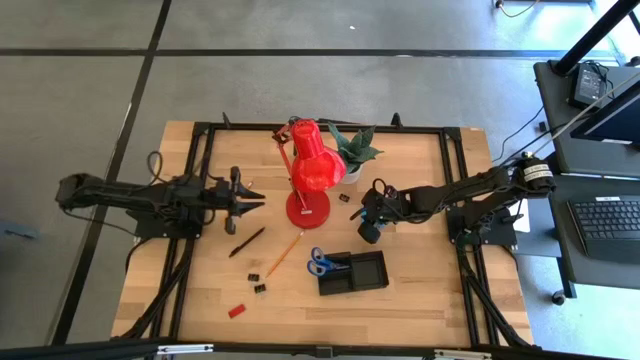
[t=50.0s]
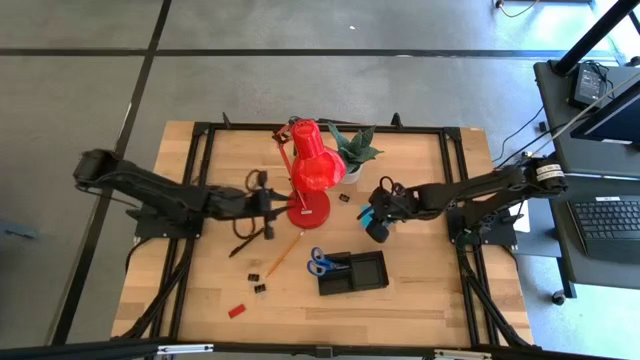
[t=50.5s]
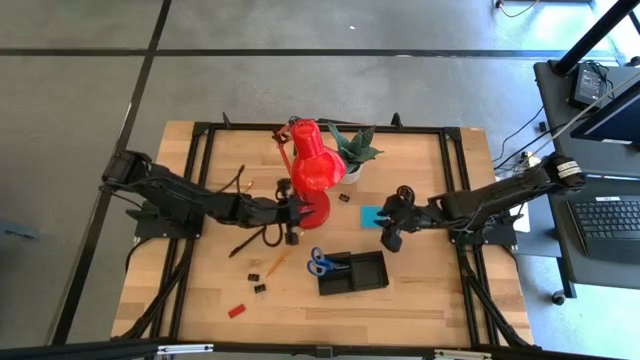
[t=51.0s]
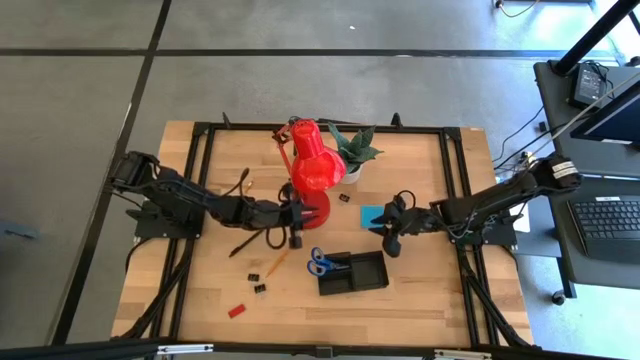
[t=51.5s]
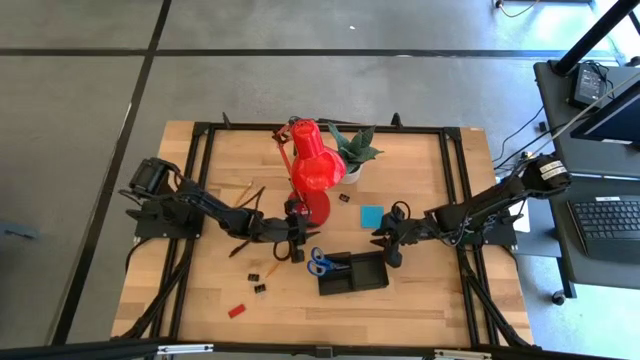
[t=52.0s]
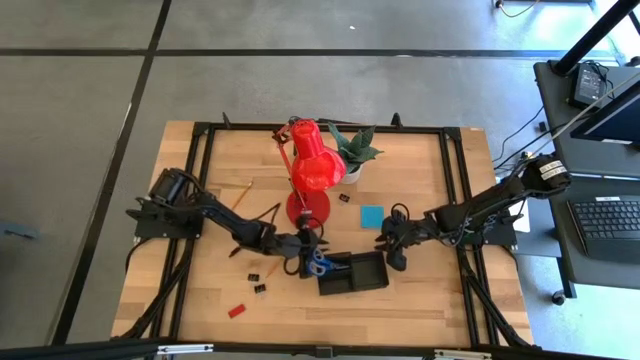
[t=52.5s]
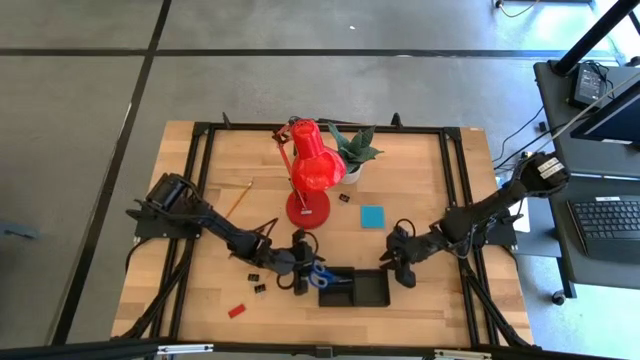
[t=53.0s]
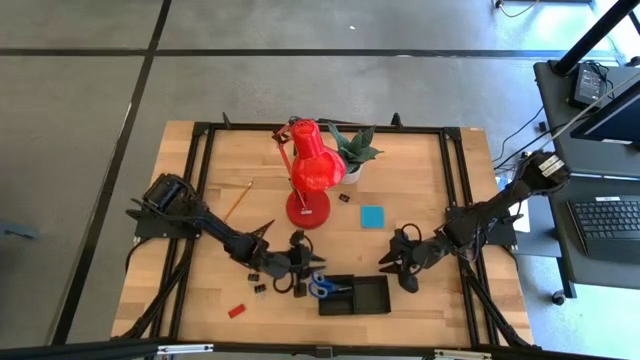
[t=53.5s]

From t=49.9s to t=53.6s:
Task: Pick and place office supplies into organizer
Adjust the black desk organizer

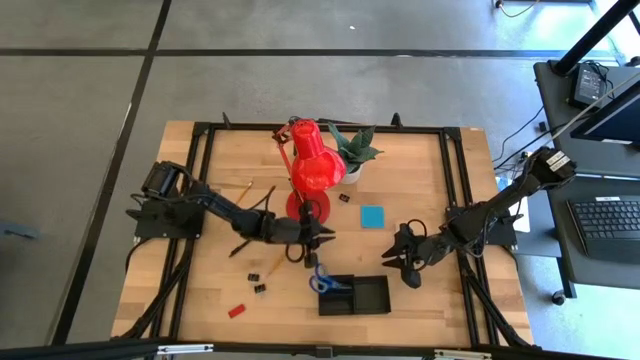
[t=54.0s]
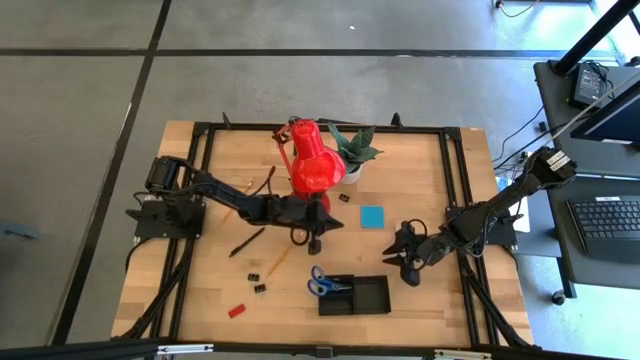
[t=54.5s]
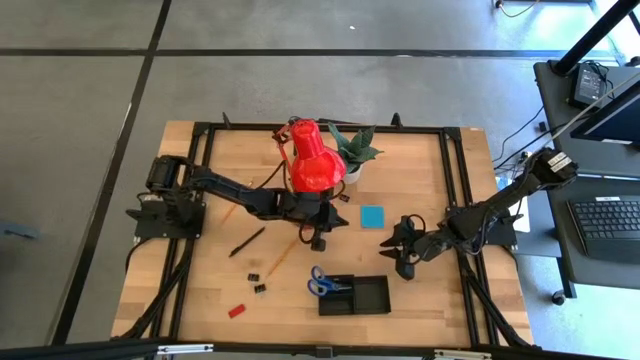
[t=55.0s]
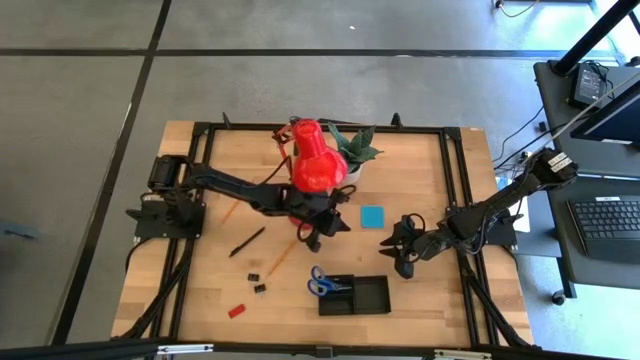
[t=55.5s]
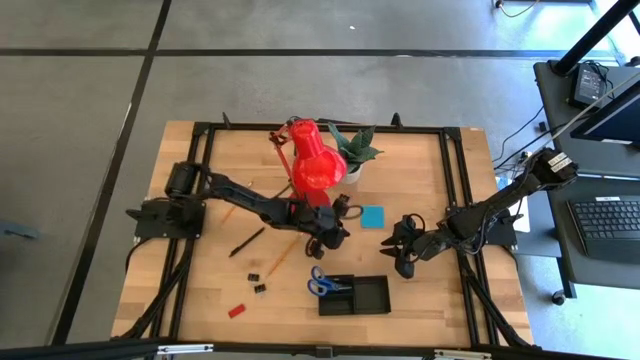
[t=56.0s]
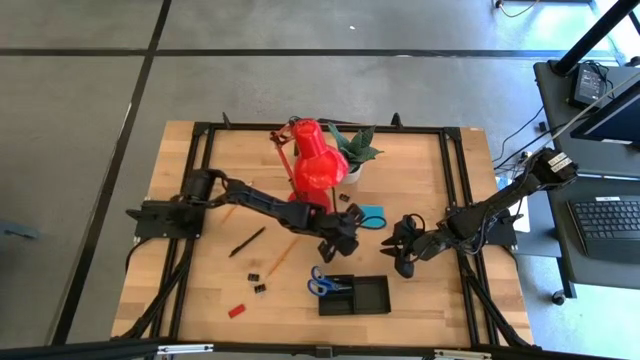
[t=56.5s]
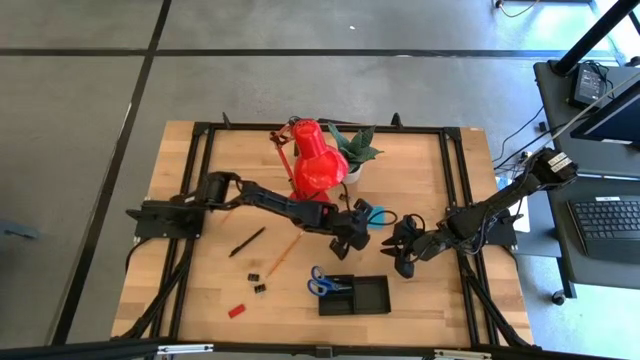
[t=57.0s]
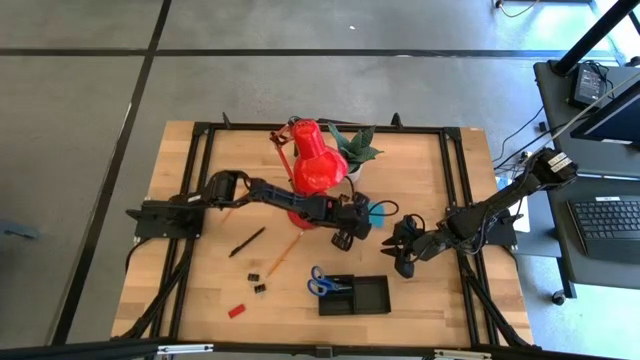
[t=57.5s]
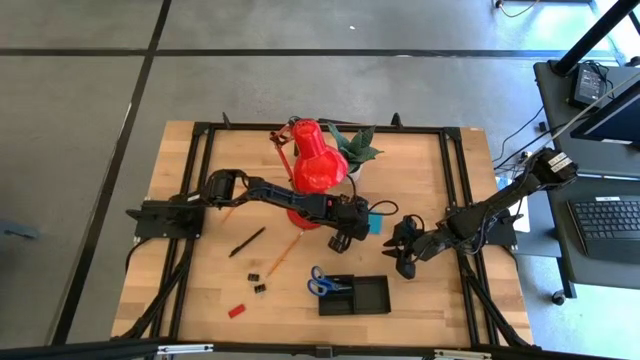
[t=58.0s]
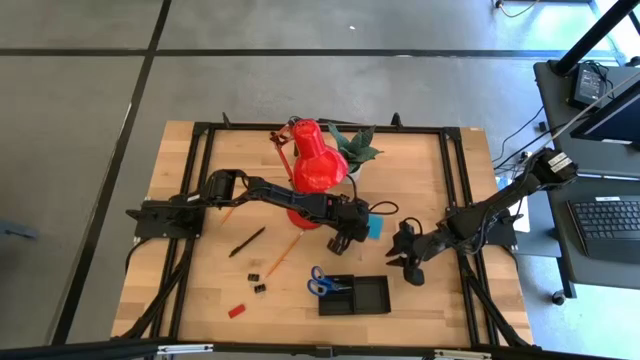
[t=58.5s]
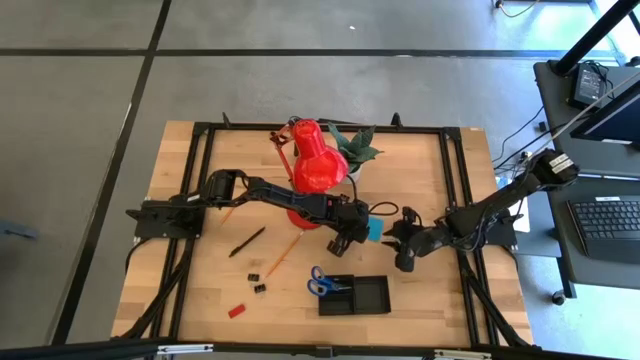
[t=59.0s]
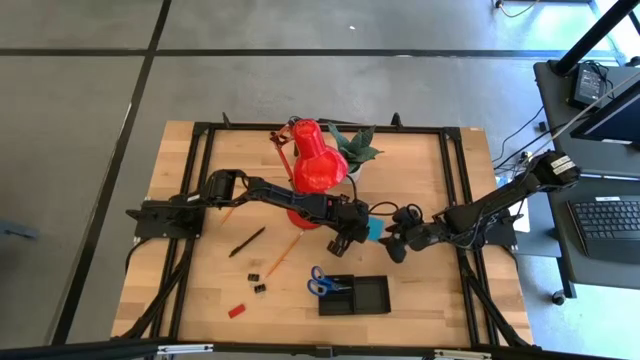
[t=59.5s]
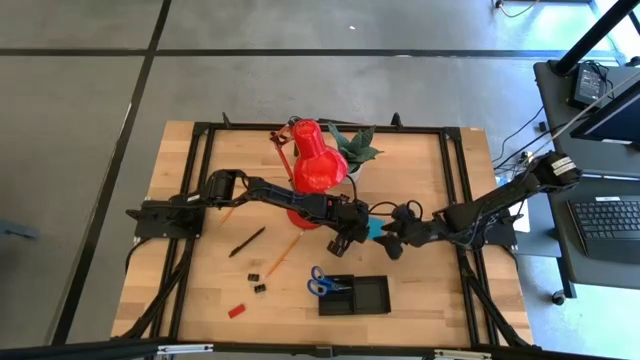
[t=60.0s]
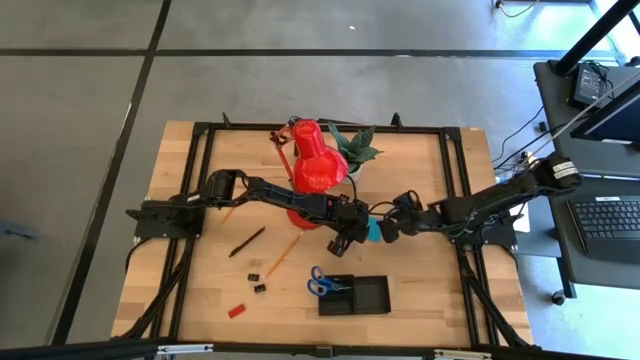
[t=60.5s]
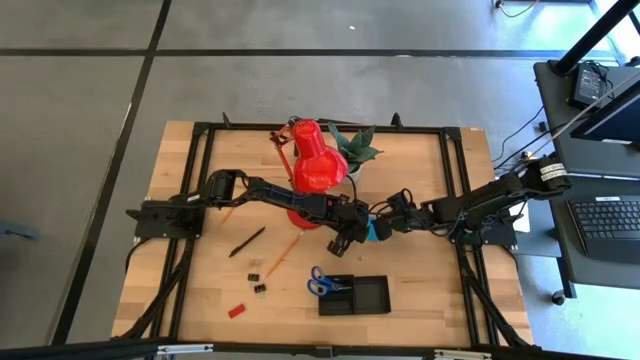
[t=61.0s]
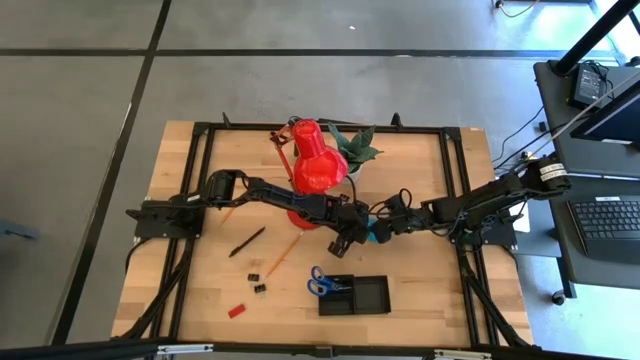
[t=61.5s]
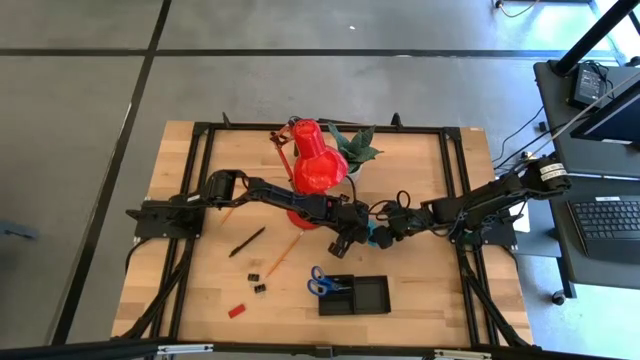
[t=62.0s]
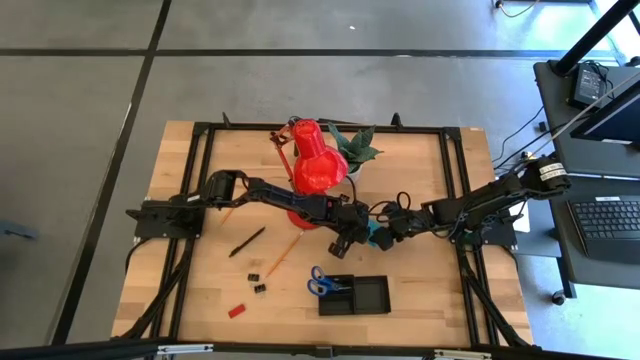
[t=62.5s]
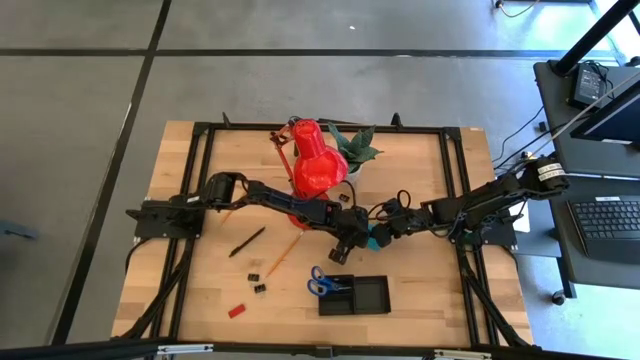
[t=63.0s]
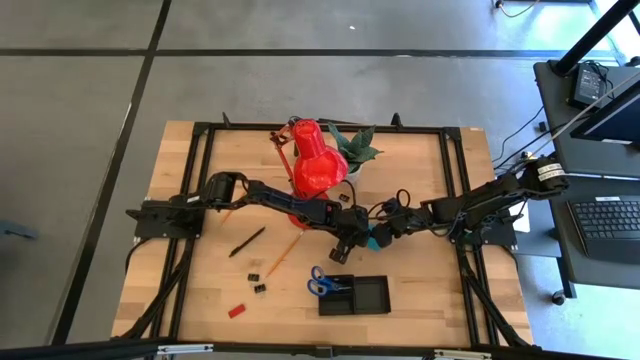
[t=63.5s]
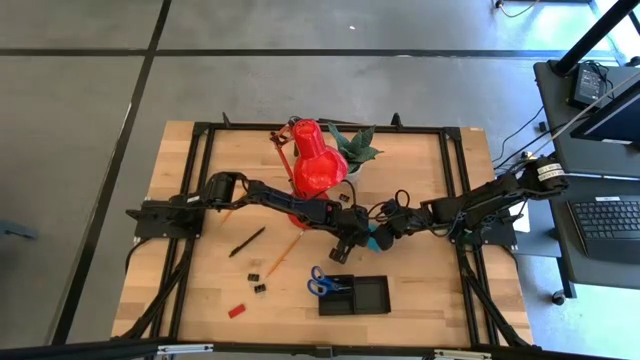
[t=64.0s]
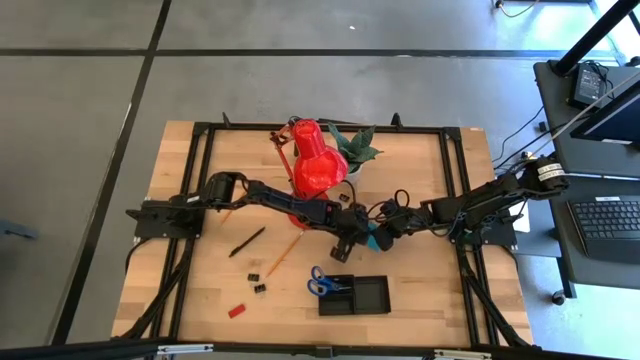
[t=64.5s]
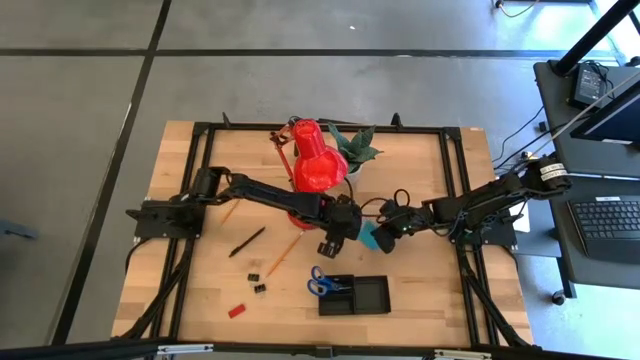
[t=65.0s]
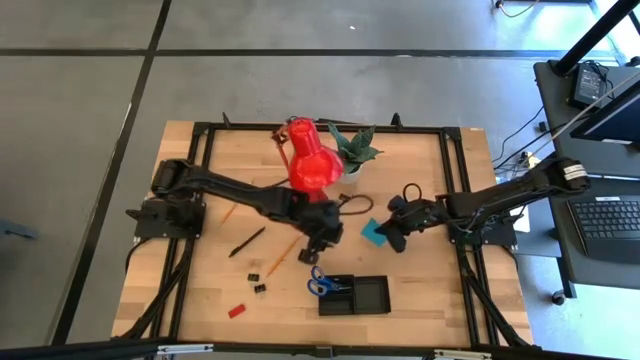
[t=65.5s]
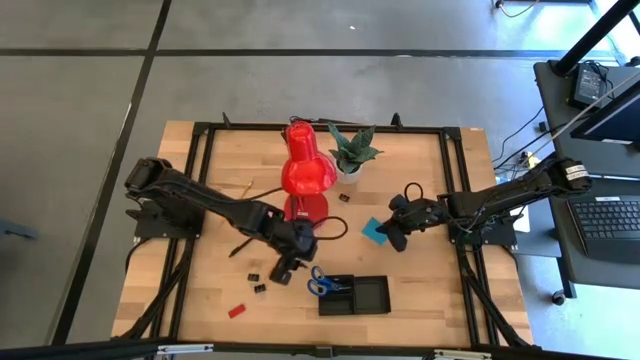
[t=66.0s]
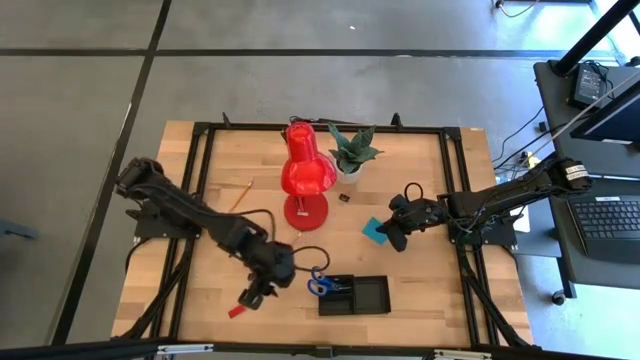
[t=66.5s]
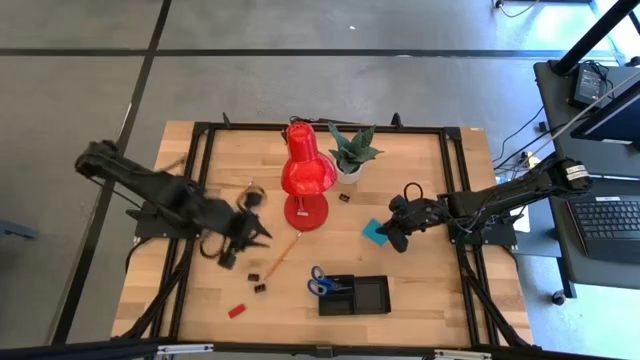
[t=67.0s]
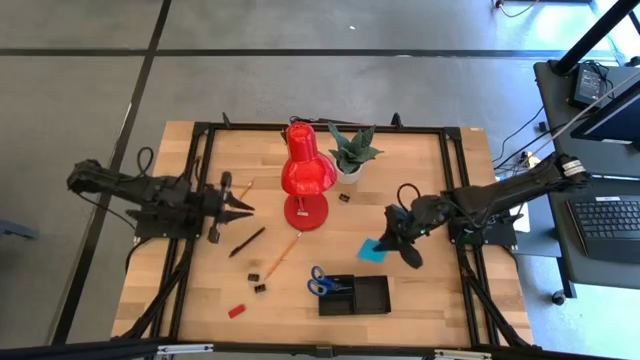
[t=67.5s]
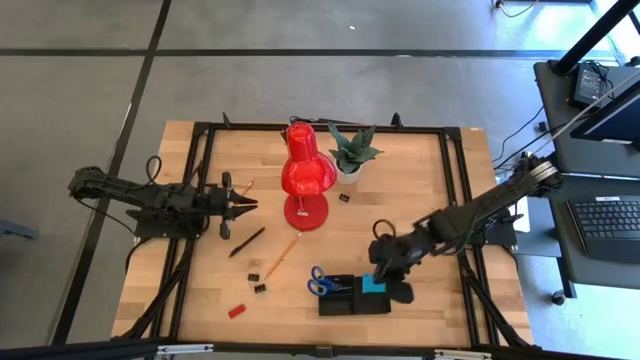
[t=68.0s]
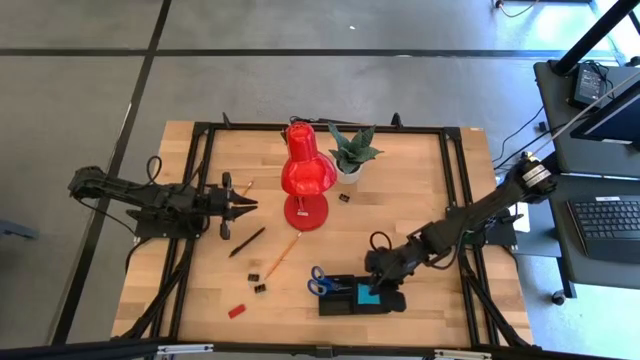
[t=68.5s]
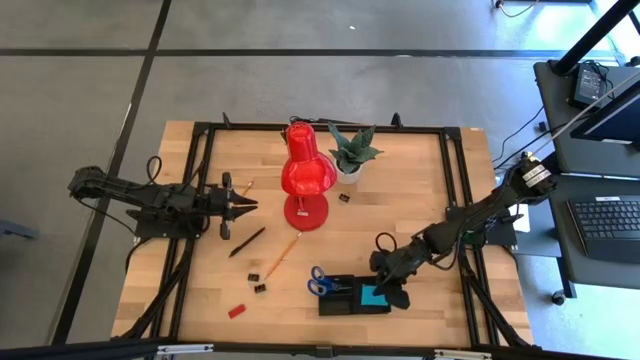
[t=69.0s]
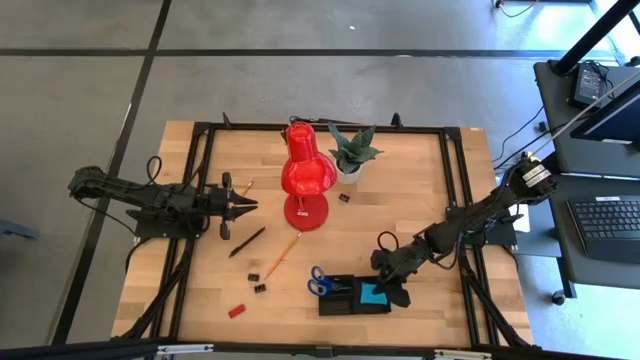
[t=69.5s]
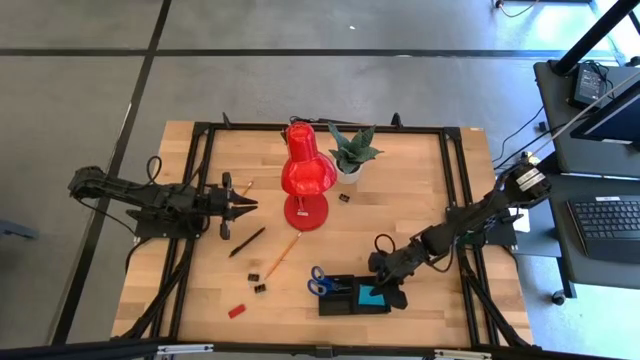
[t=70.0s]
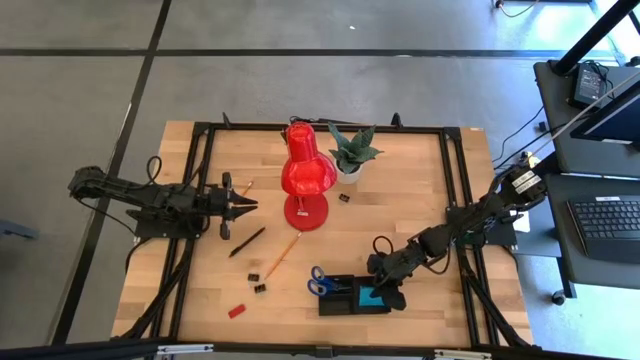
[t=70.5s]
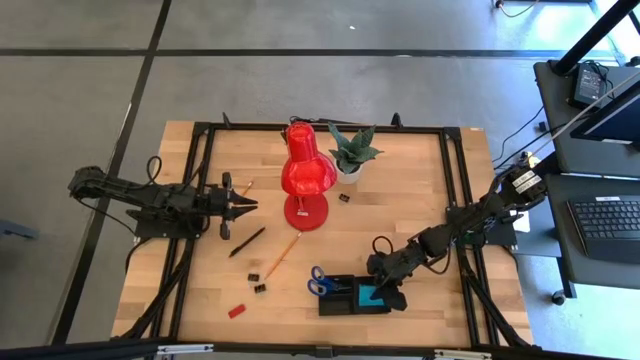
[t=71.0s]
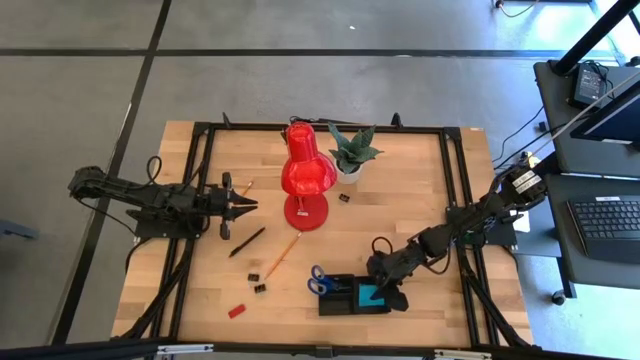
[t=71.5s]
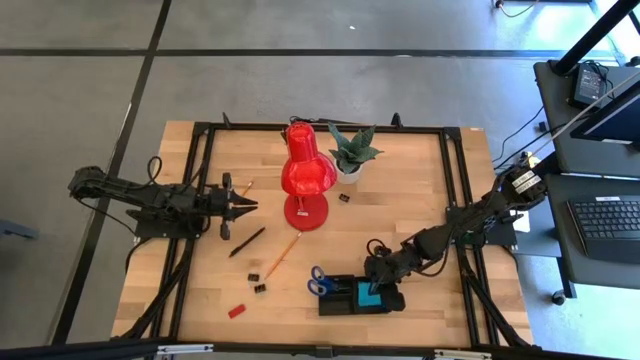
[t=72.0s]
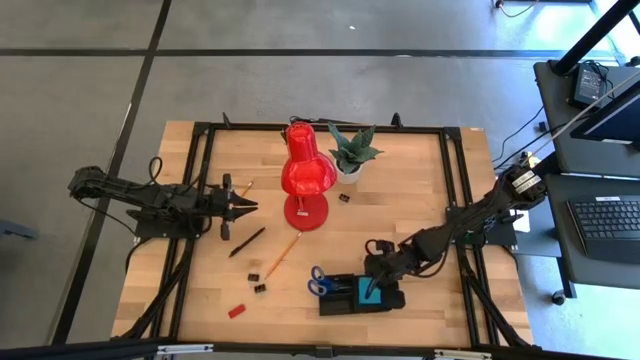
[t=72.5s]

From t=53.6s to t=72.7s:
Put the blue sticky note into the black desk organizer
